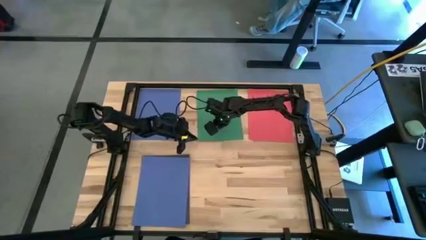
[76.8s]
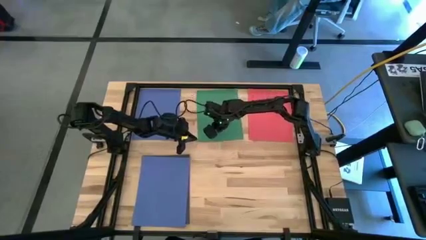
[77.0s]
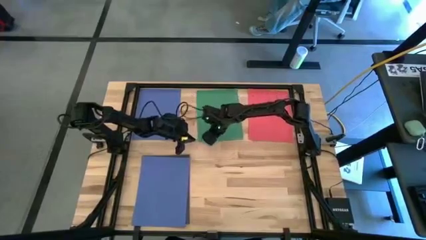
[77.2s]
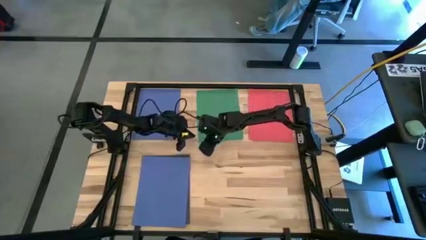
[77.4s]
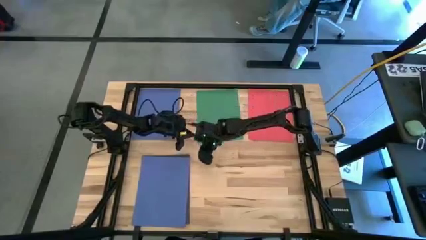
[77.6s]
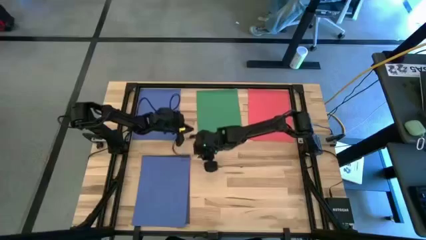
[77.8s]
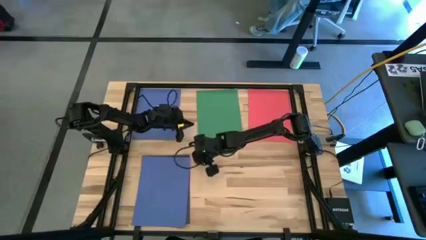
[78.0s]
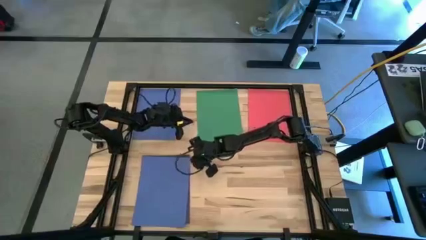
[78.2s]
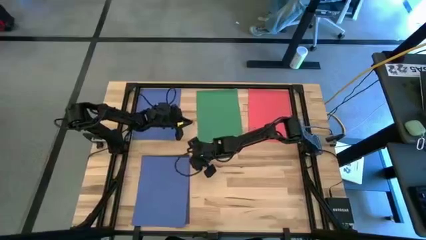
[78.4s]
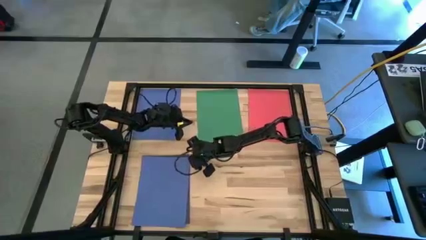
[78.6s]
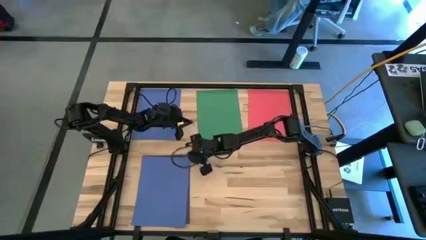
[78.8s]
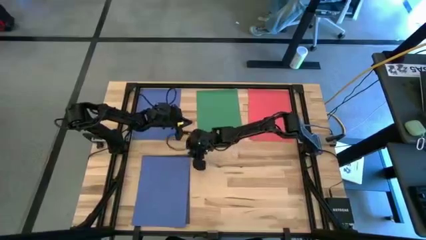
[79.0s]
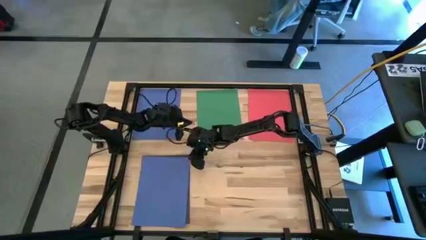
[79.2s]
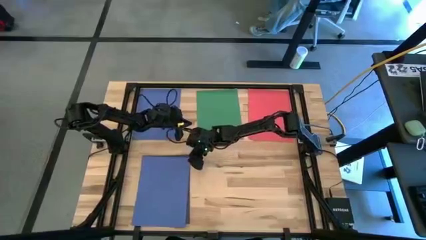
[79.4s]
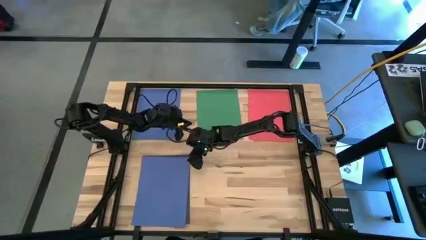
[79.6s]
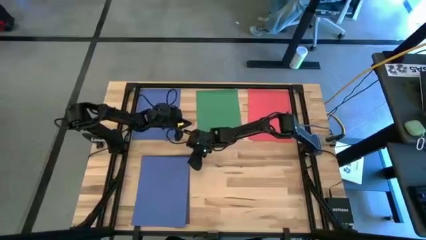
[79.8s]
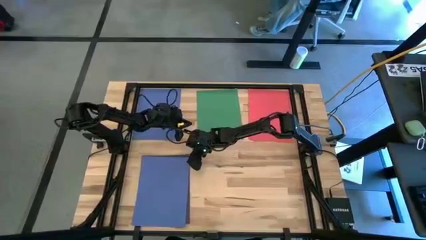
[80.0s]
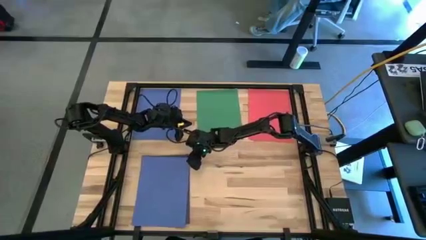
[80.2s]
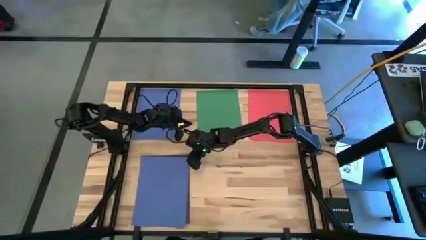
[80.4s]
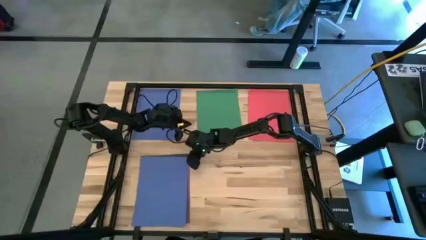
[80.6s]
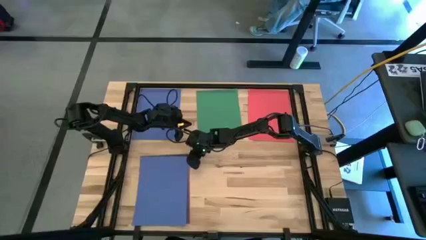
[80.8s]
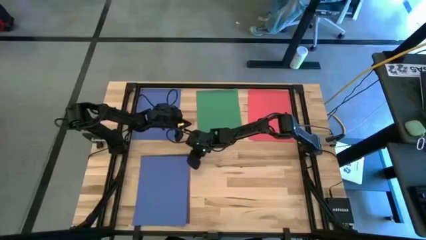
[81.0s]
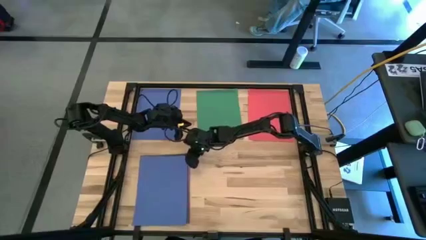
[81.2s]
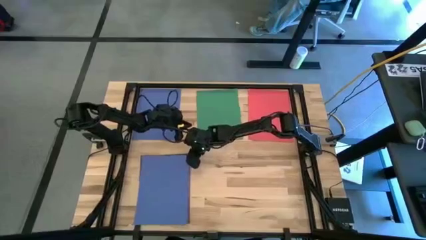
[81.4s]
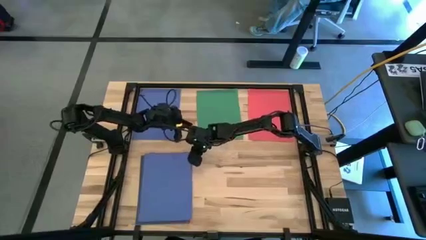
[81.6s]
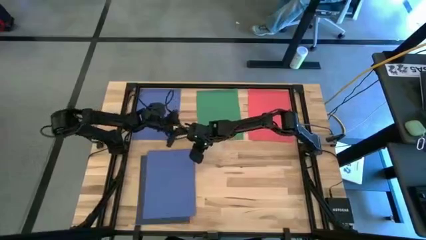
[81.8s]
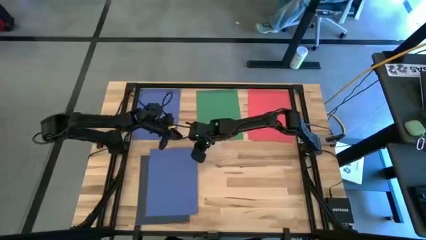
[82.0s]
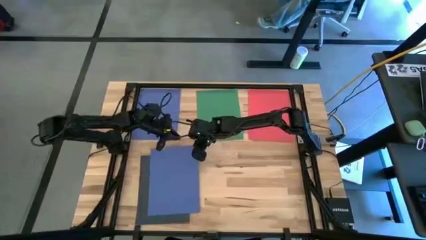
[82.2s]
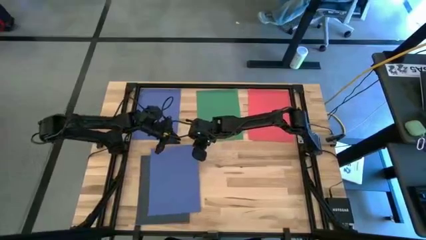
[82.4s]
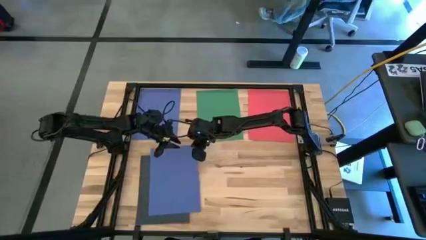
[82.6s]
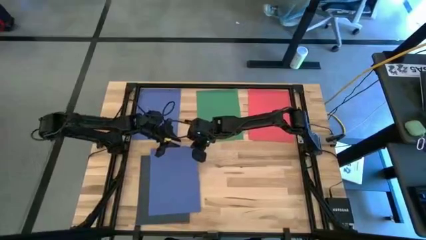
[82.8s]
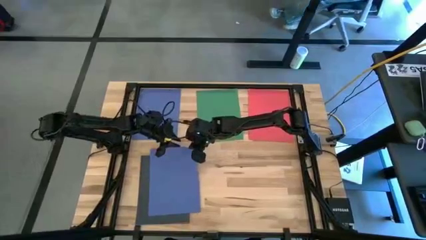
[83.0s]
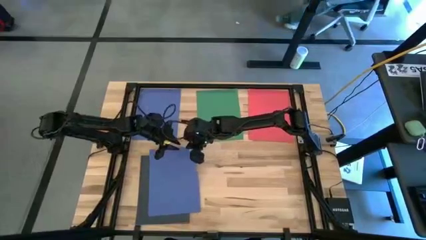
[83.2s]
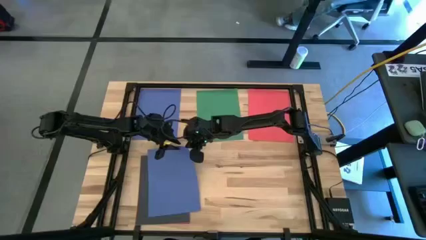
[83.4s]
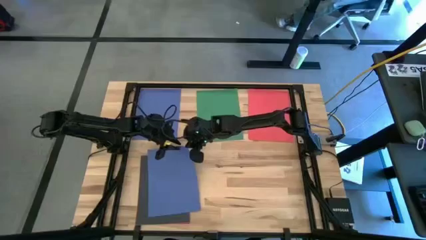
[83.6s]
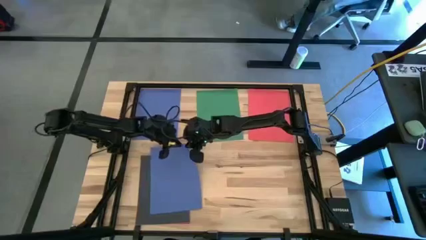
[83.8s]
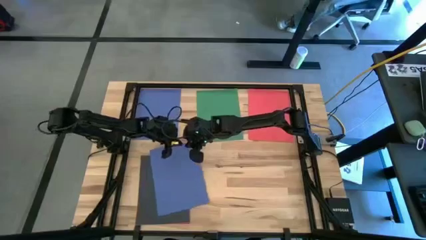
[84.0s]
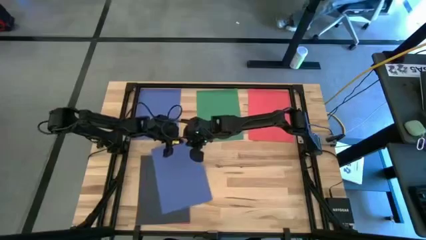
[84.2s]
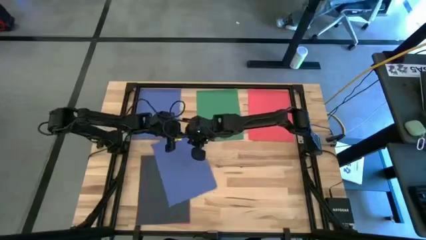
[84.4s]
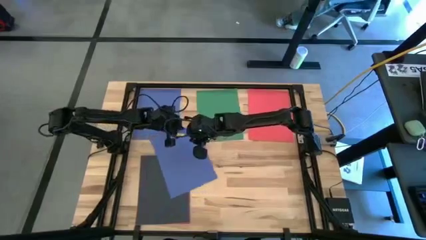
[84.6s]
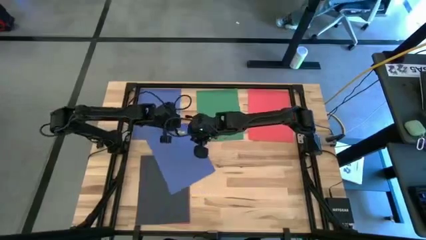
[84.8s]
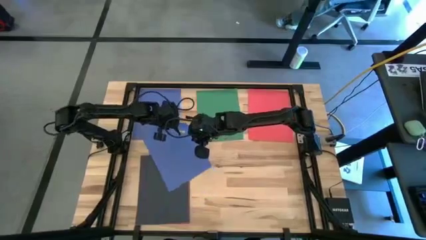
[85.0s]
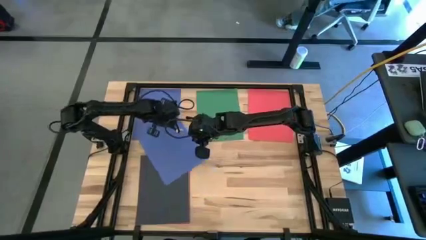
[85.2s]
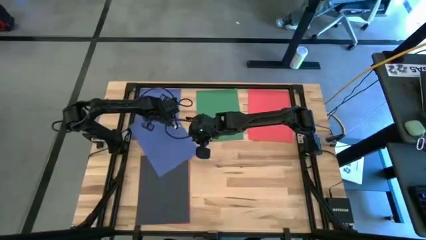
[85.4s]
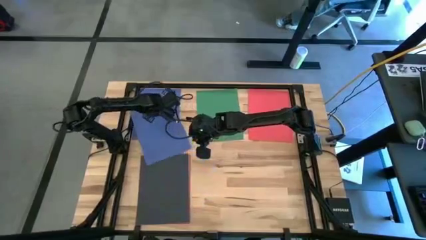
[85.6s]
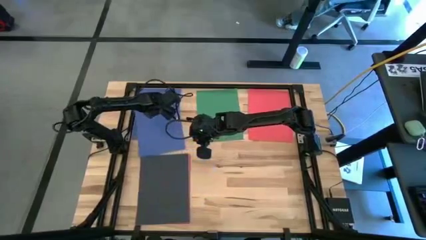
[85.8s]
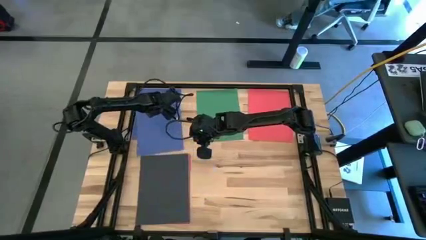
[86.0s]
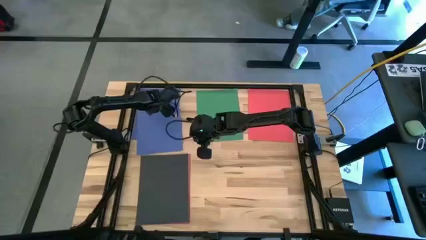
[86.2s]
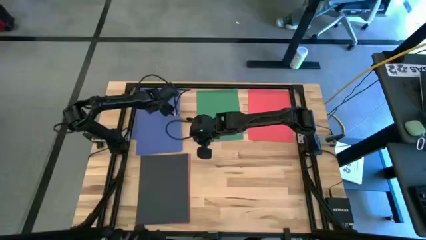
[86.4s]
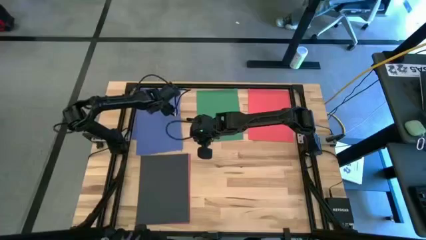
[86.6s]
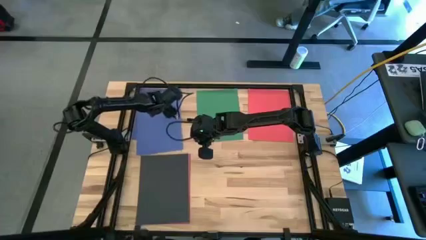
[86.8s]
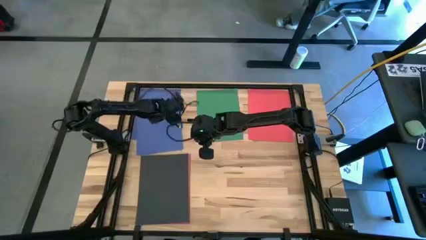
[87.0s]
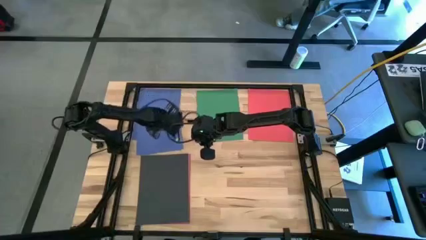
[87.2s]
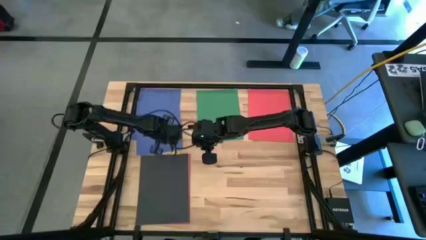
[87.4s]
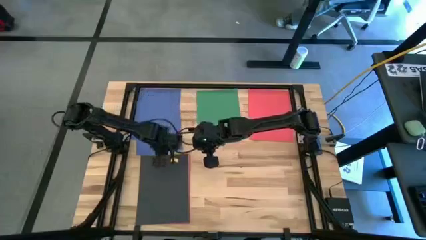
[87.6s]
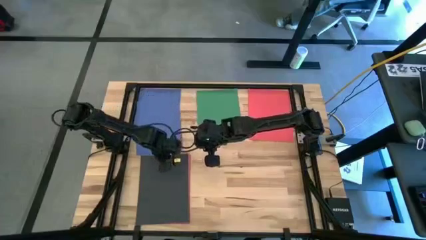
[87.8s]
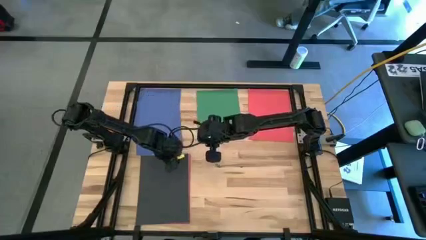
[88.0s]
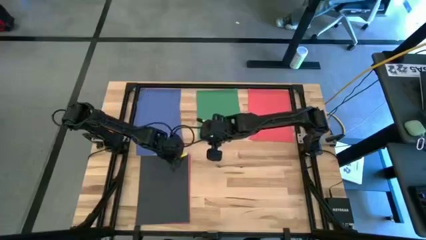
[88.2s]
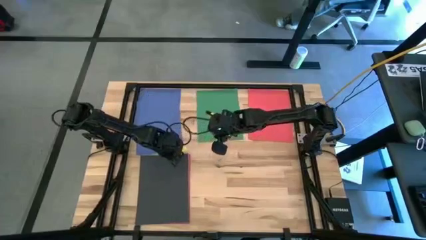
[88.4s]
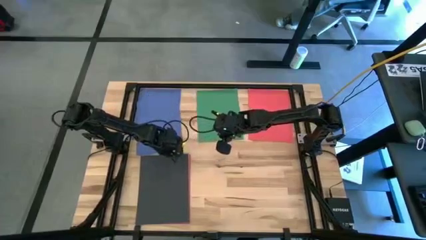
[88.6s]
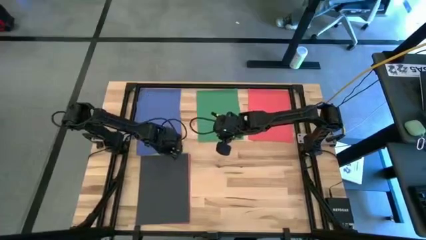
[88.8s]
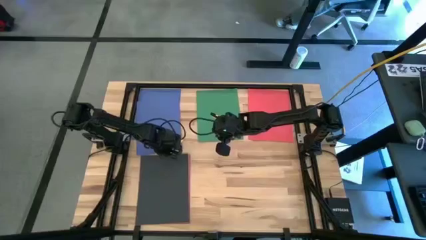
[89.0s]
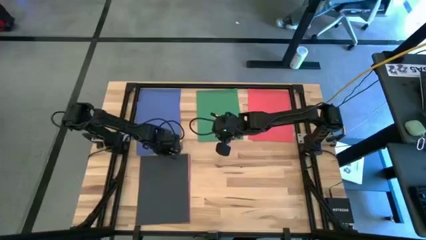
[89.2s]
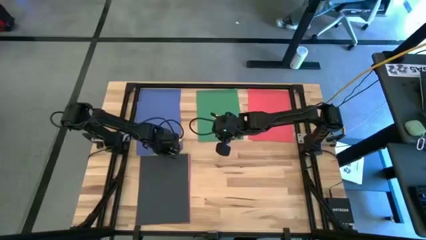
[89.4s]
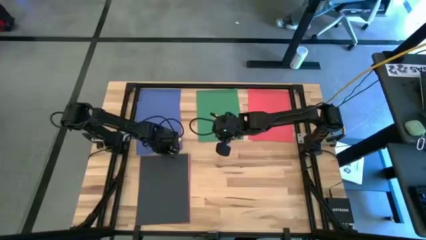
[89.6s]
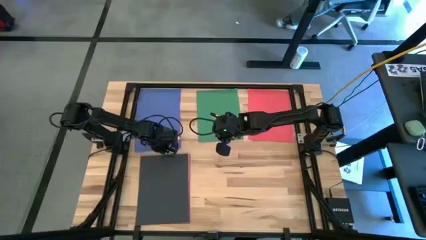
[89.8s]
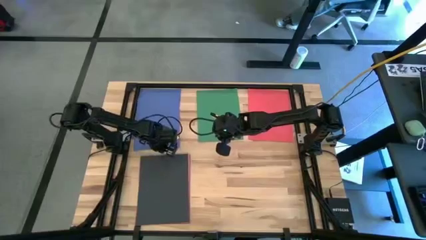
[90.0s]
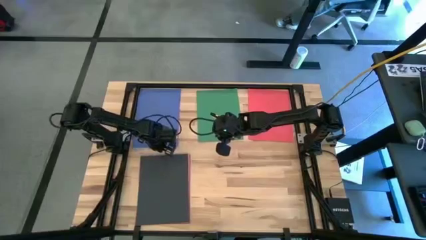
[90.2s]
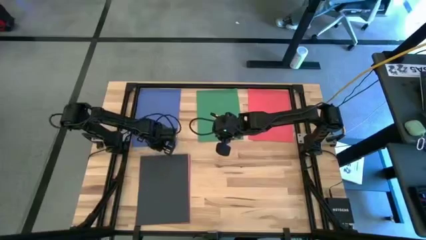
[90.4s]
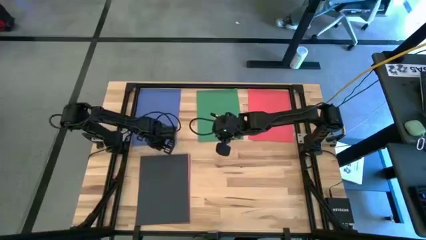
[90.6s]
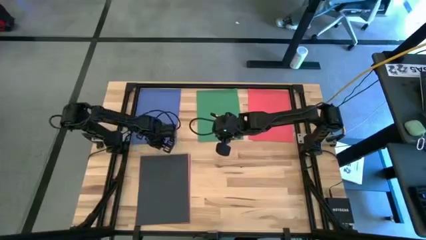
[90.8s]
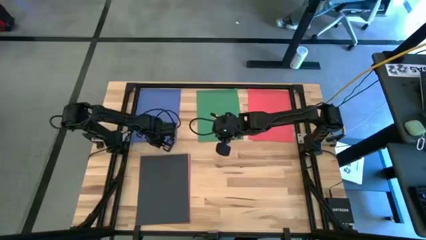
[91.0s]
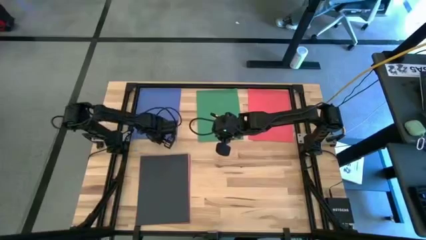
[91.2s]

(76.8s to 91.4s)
Task: Organize paper
Stack the blue paper on top of the other blue paper

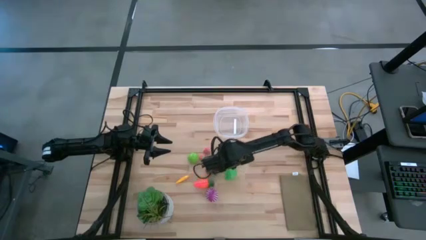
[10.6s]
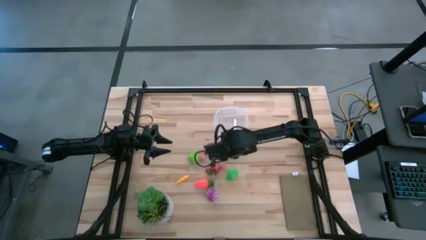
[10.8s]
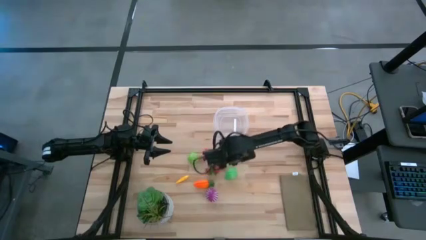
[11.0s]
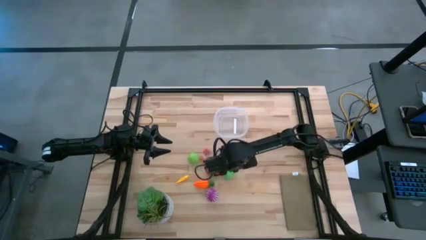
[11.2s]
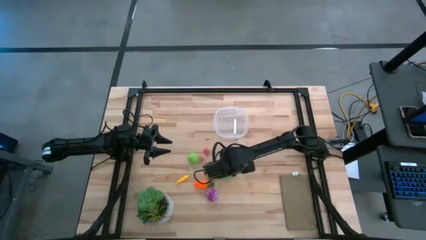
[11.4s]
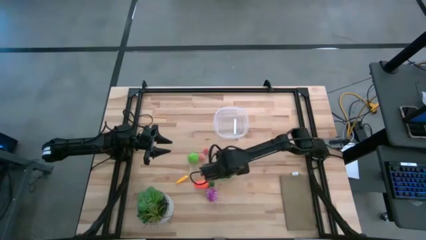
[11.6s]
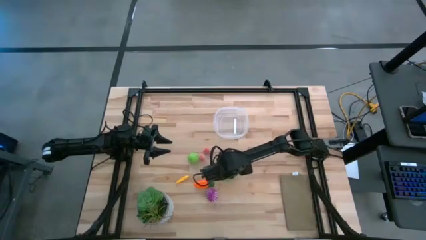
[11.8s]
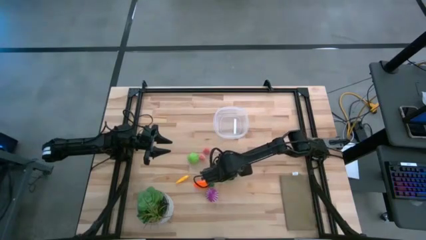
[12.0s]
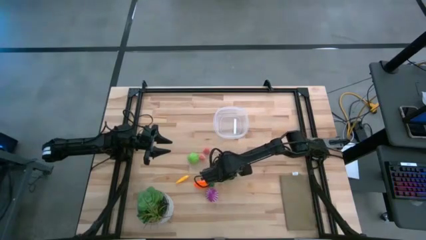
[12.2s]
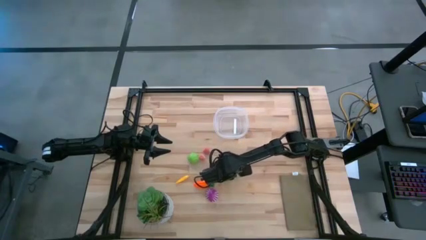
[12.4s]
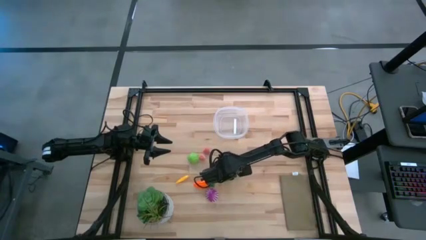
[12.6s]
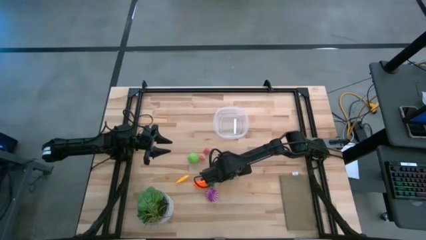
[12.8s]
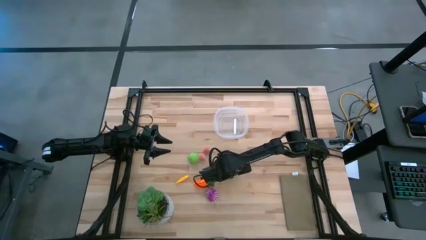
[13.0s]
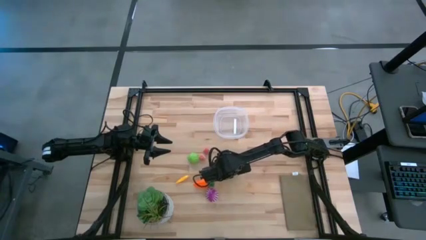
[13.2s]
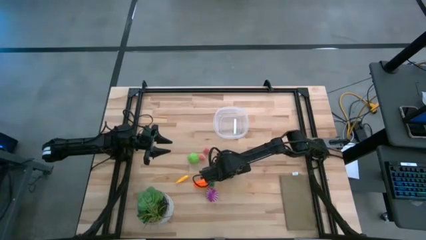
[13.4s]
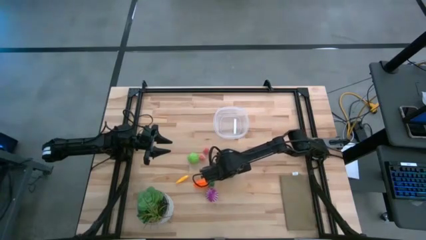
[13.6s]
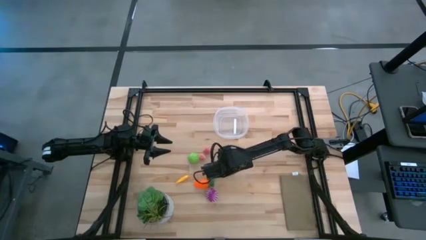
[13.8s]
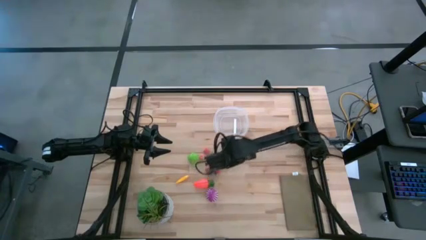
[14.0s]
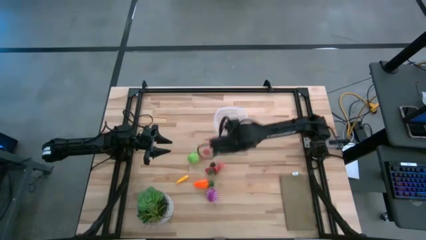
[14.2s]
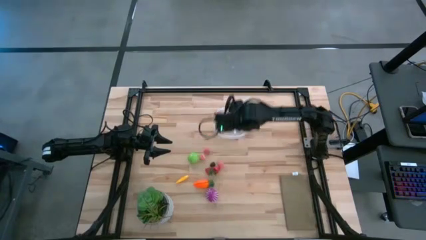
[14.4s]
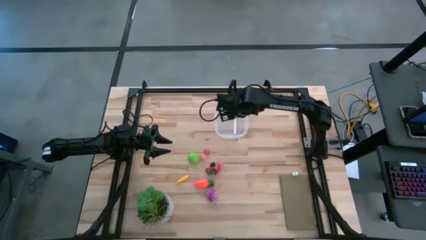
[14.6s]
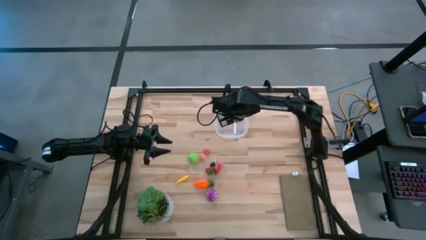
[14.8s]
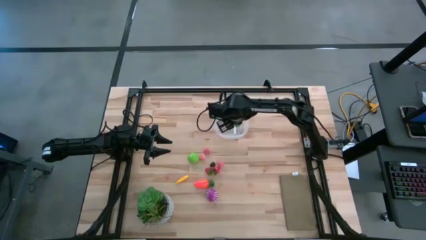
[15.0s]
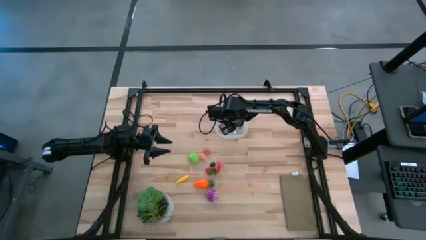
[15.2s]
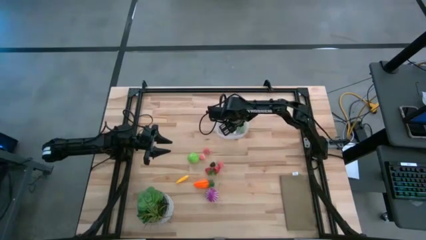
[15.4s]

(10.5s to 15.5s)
Task: Pick and placing Produce into tupperware
Put the green pear into the transparent bin
